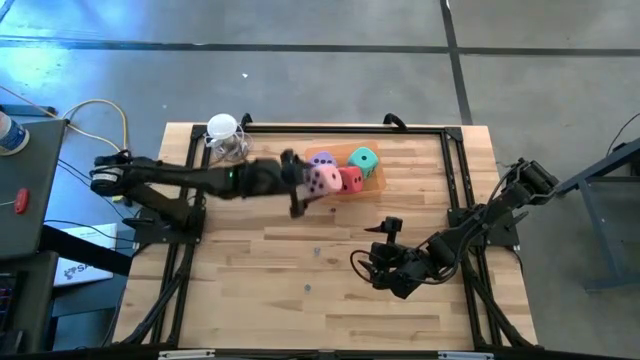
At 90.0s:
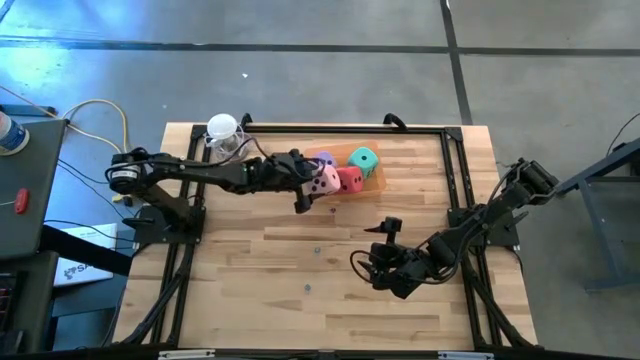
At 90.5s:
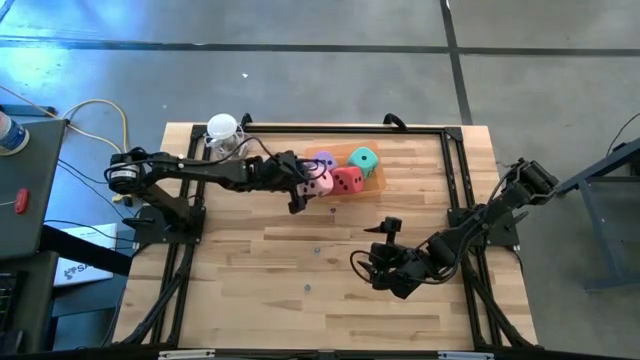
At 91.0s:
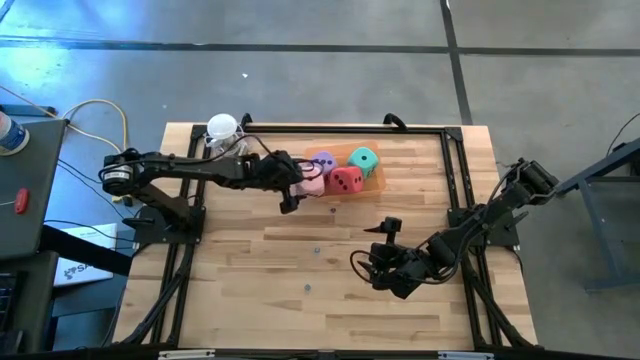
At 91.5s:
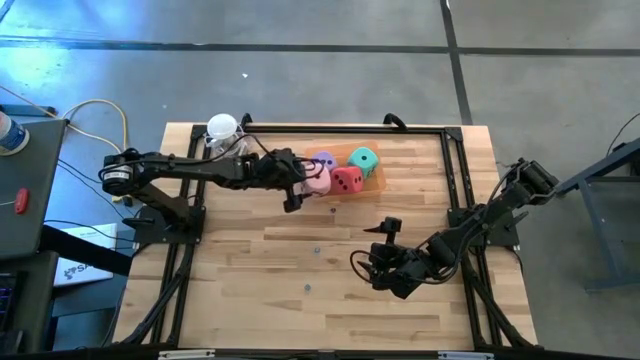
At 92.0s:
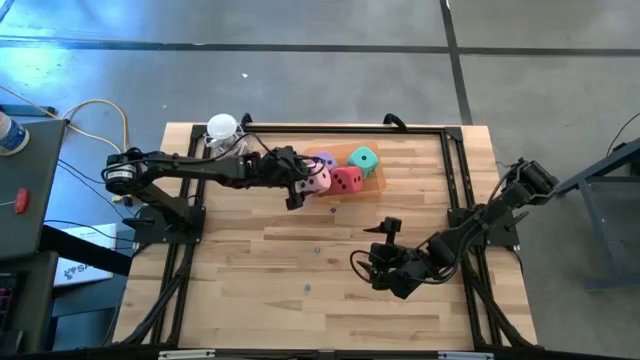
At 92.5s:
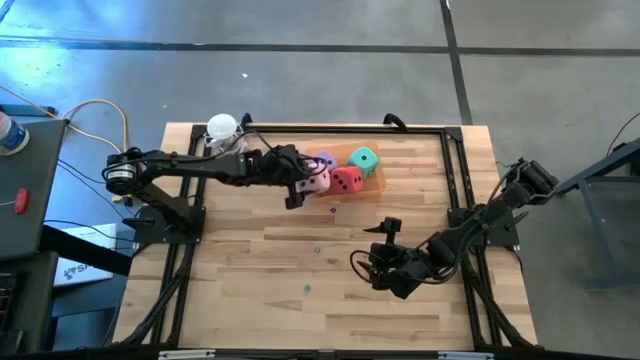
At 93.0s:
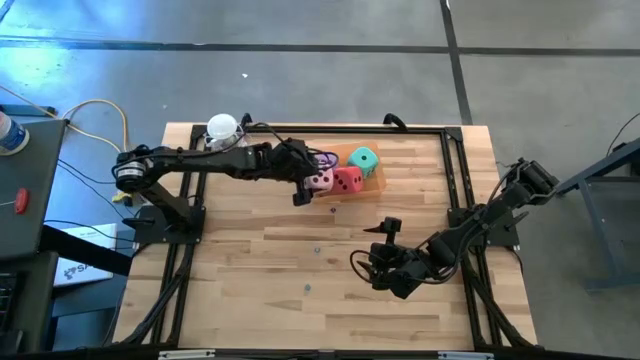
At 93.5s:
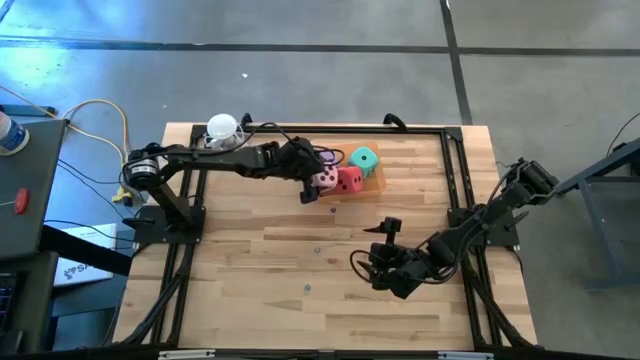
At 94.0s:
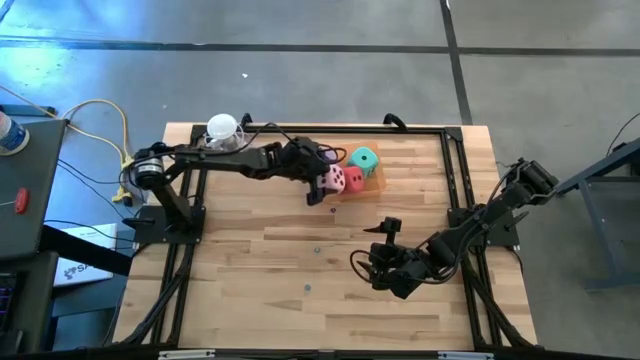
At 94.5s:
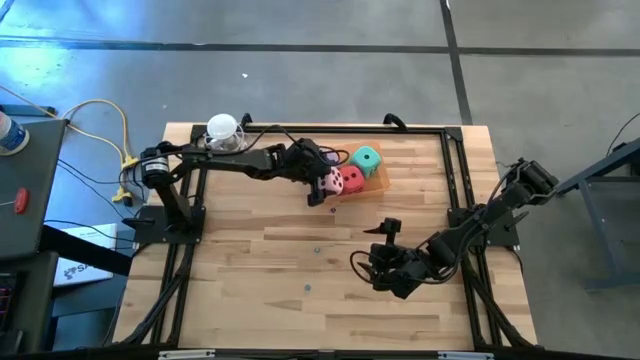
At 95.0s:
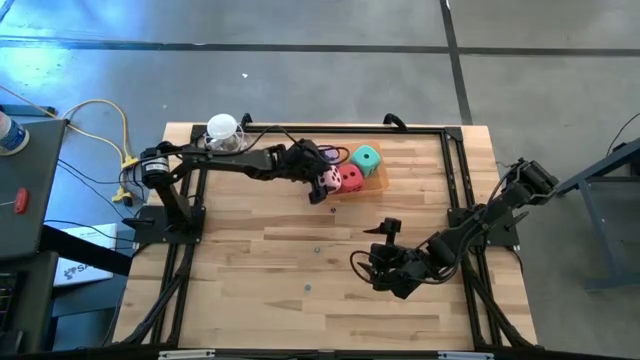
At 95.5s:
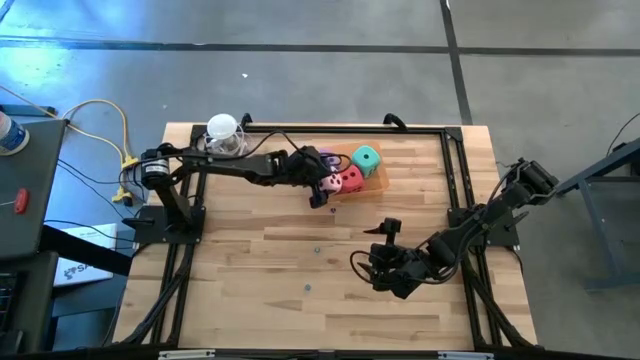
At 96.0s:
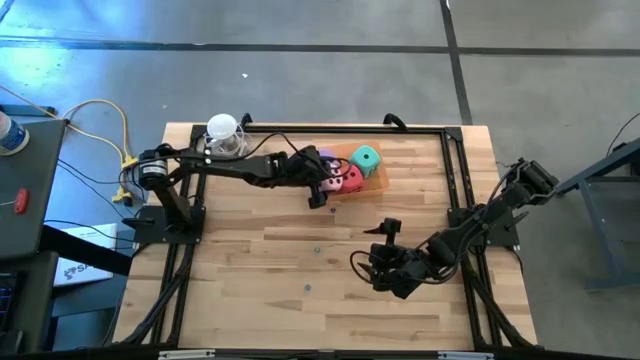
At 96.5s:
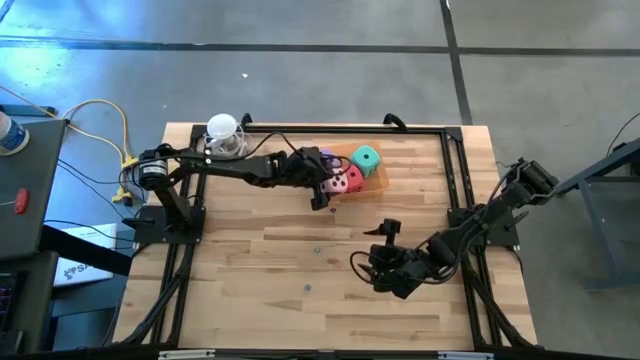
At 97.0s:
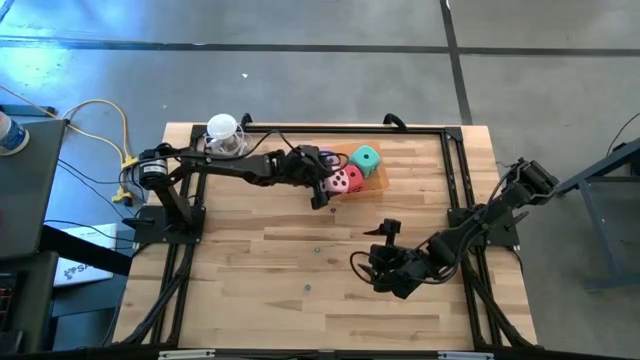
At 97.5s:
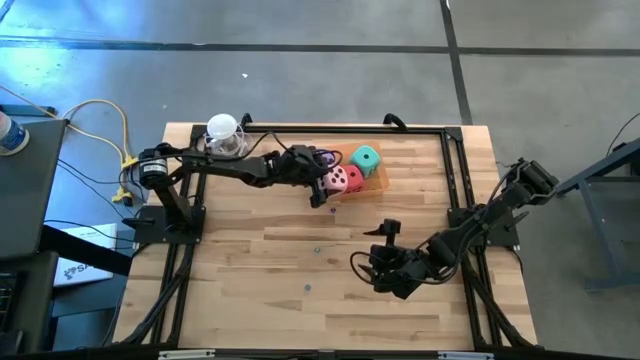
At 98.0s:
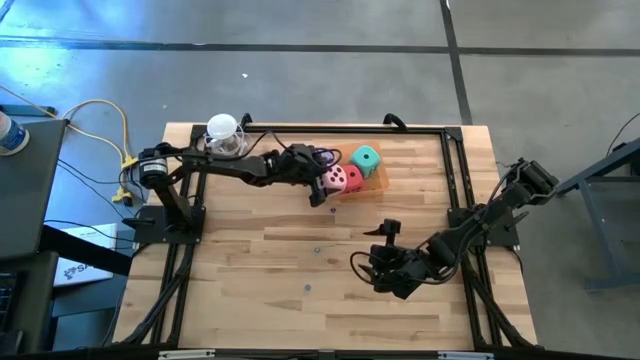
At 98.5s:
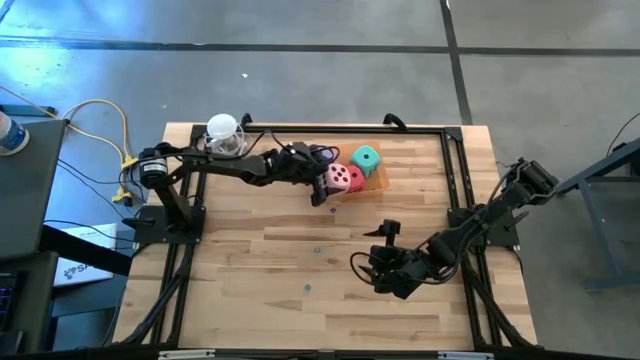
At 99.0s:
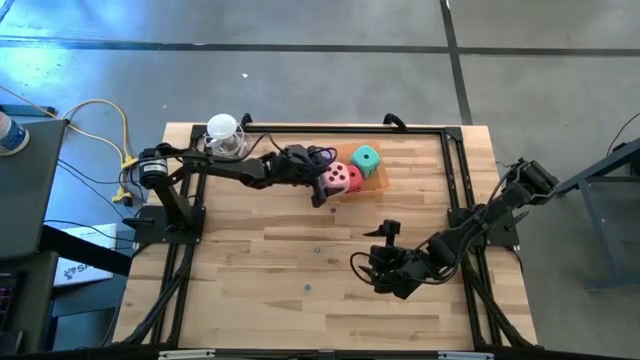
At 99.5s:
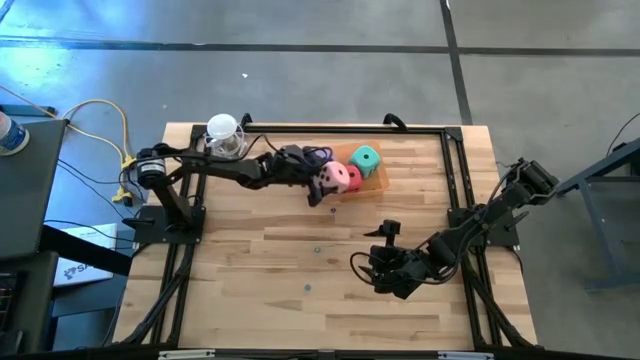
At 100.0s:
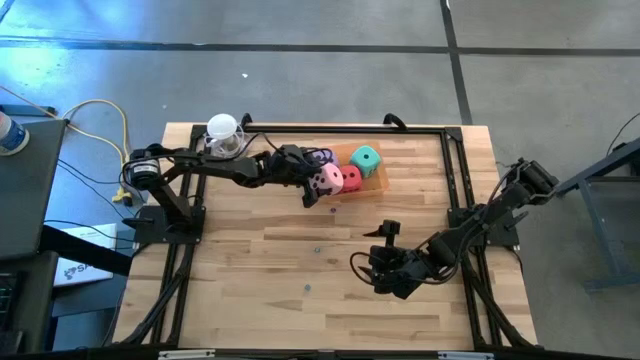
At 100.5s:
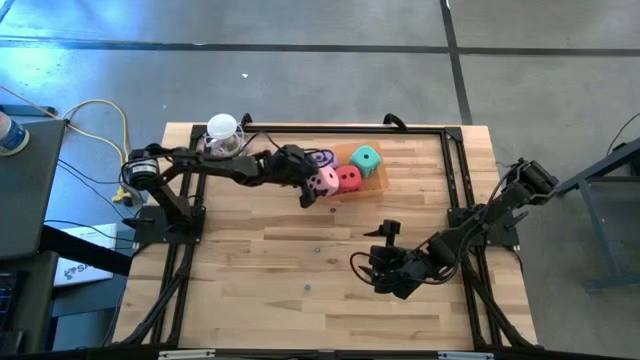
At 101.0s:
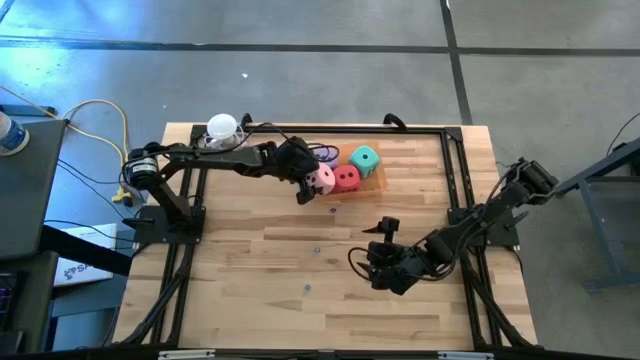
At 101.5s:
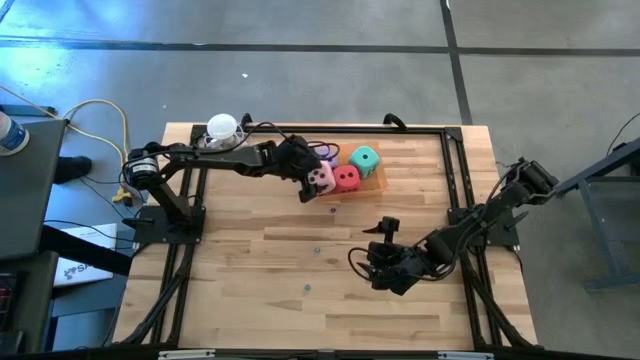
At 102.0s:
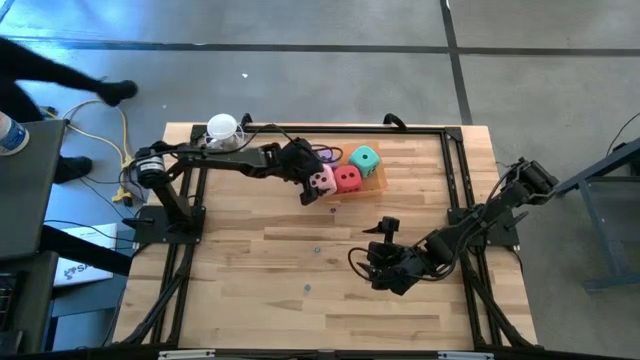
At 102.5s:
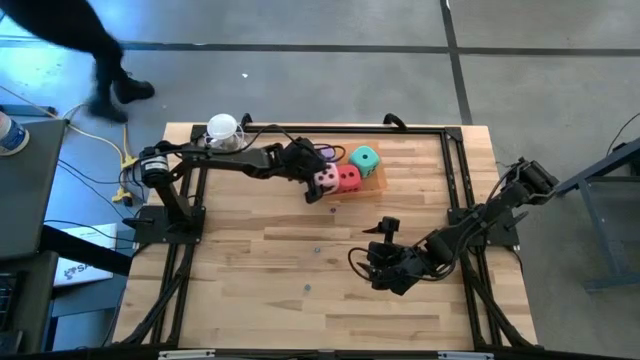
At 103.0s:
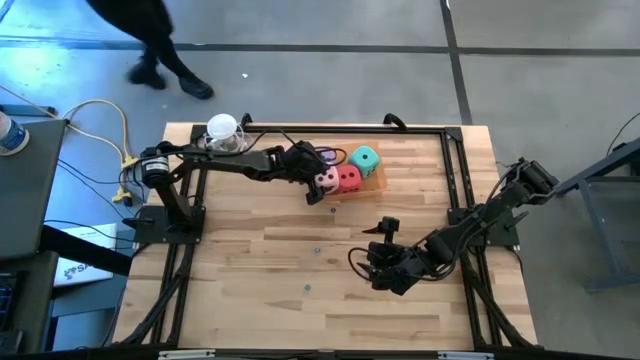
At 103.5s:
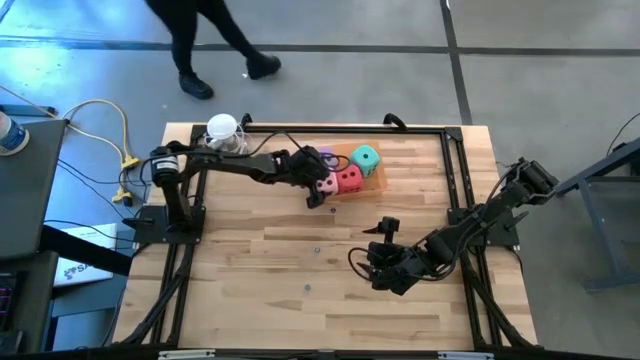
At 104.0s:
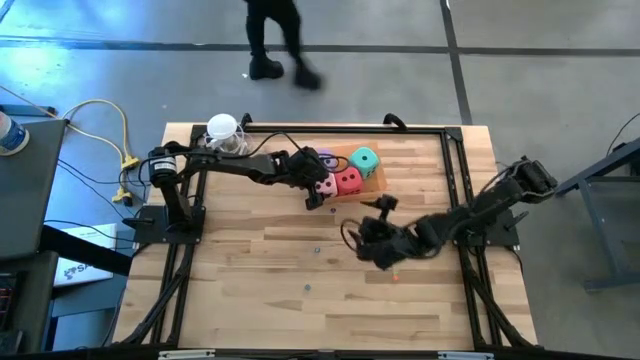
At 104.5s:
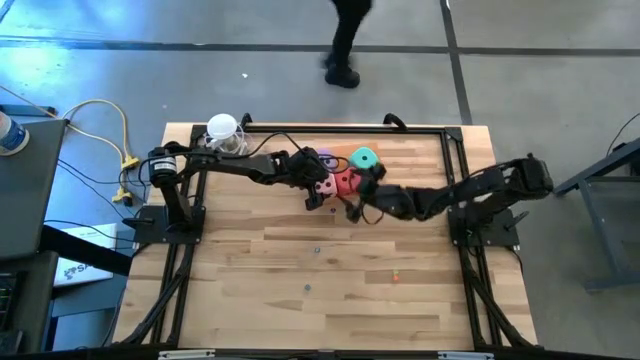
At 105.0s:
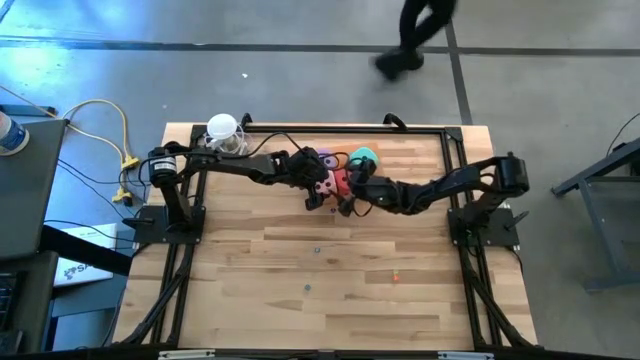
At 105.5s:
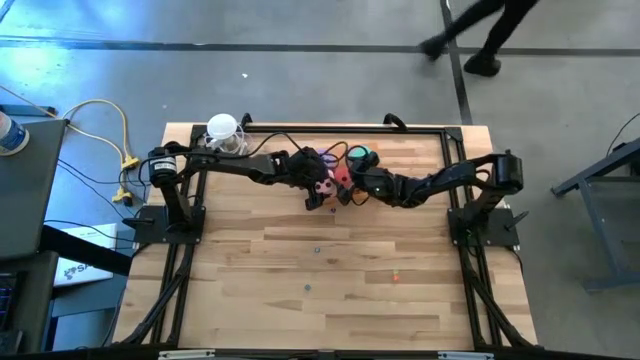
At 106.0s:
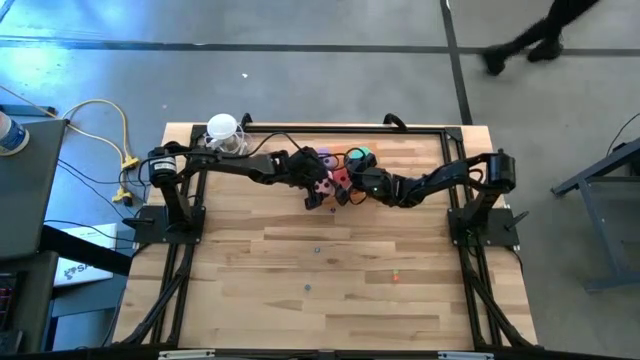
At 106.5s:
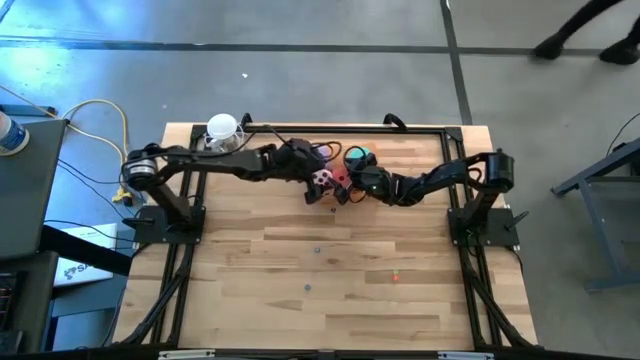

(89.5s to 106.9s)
Task: Pick & Place Dice
Put the large pink dice into the orange container

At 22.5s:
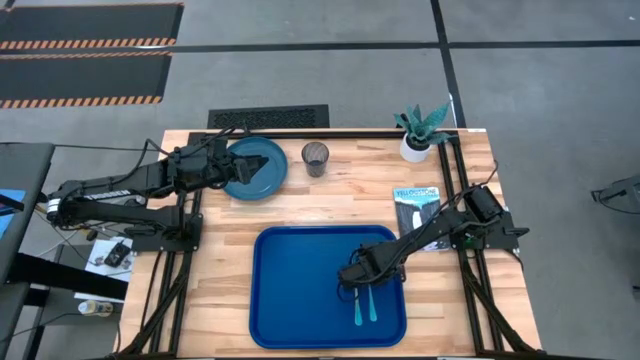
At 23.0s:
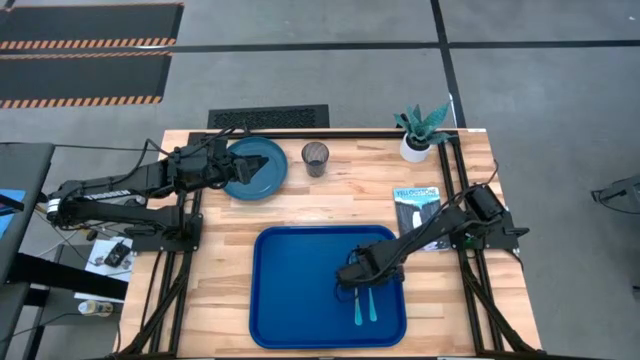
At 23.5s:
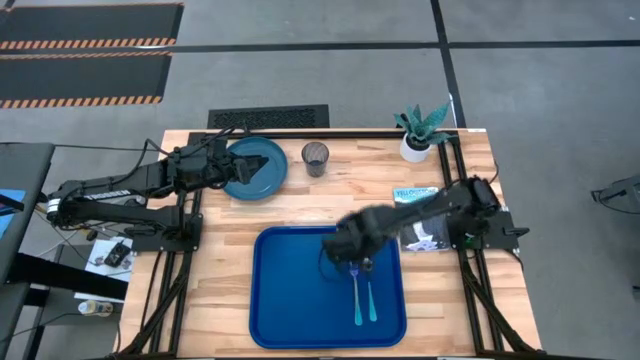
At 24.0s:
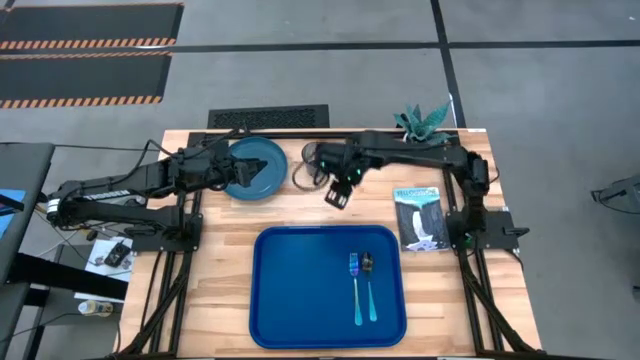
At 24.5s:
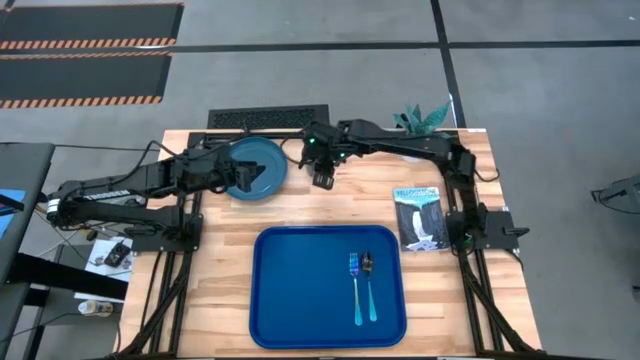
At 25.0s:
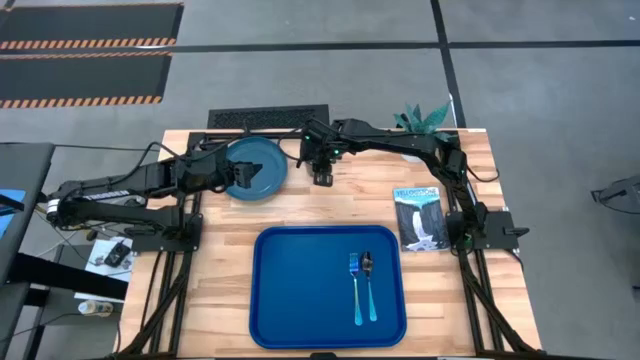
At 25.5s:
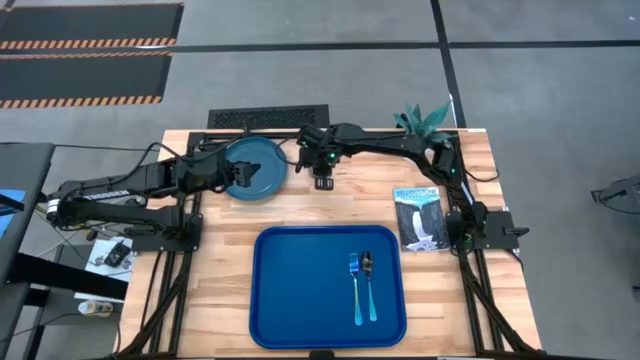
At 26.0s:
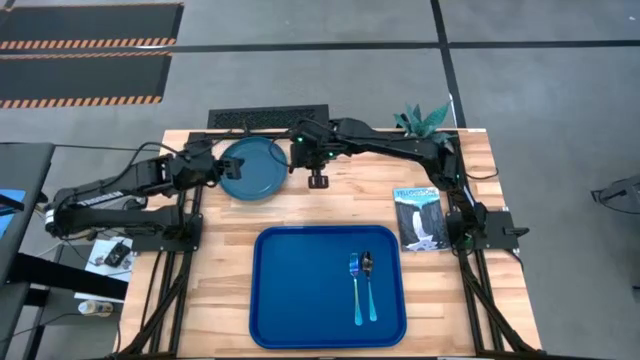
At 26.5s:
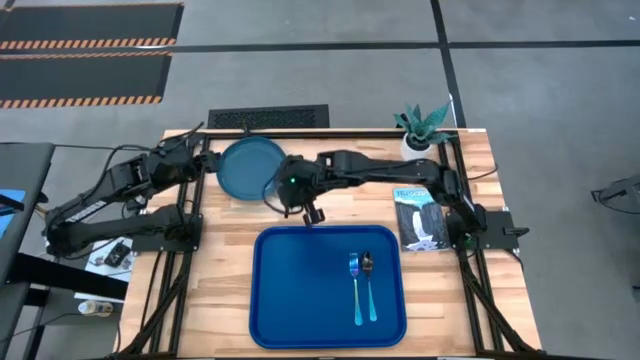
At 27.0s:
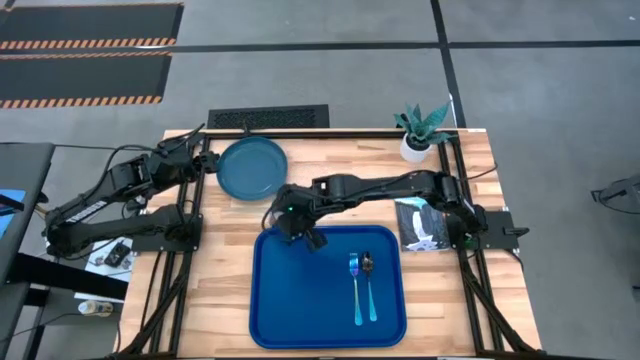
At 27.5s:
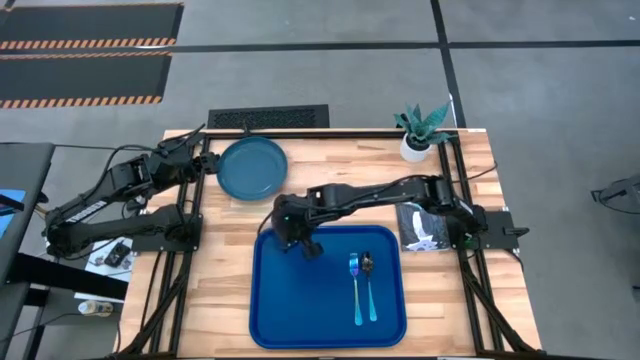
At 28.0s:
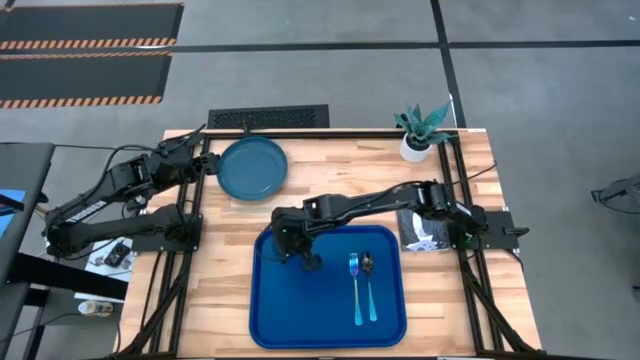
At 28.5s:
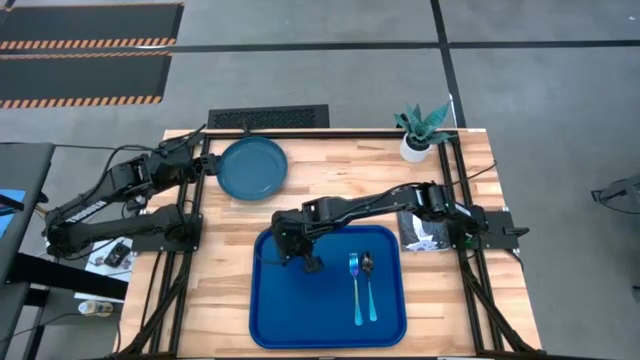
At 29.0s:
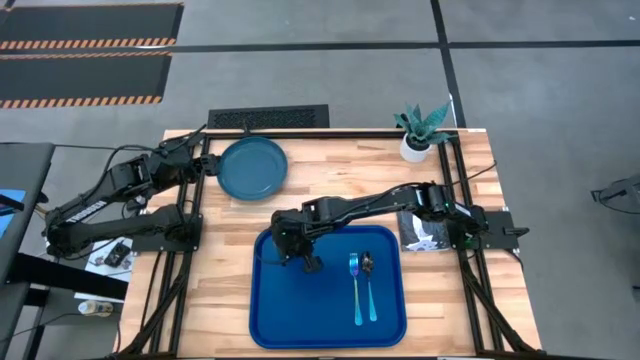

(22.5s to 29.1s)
Task: Pick and place plate/cup/fork/spoon on tray
Put the blue cup to the top left of the blue tray
